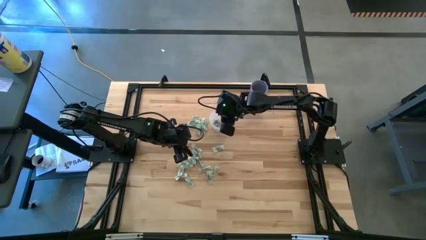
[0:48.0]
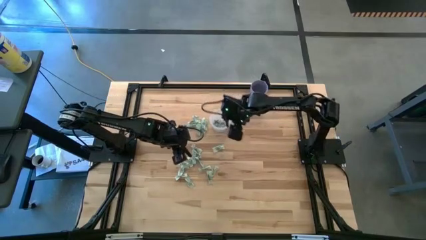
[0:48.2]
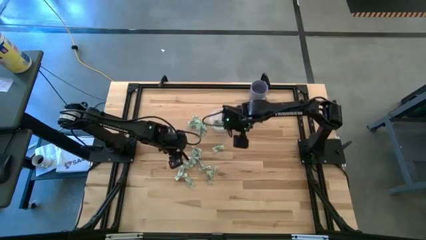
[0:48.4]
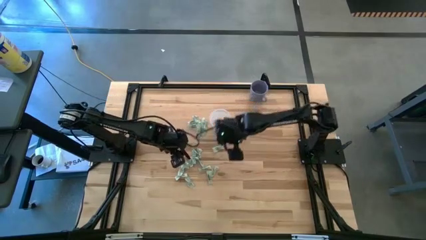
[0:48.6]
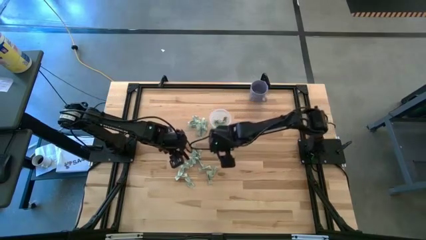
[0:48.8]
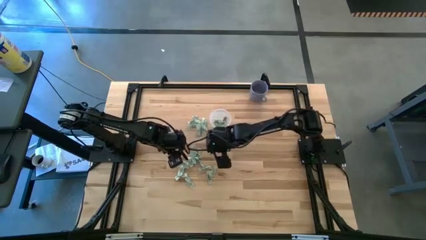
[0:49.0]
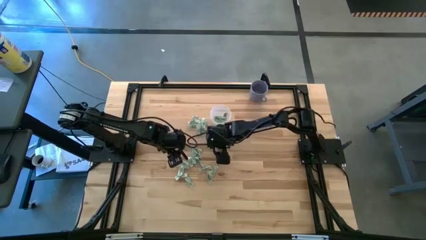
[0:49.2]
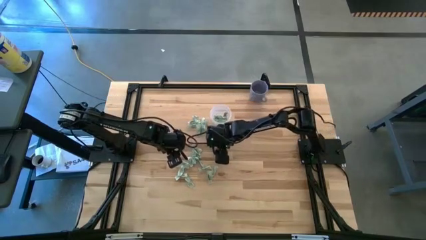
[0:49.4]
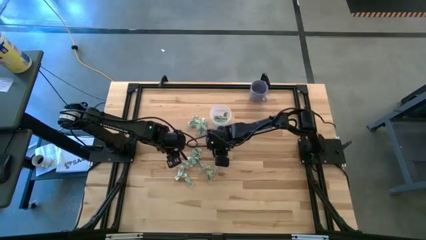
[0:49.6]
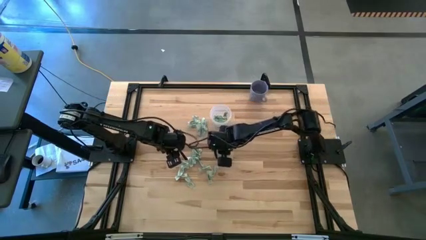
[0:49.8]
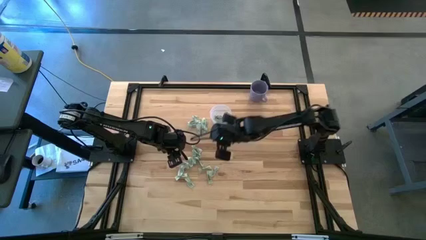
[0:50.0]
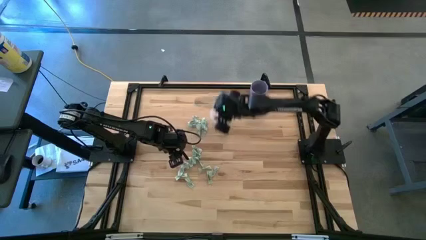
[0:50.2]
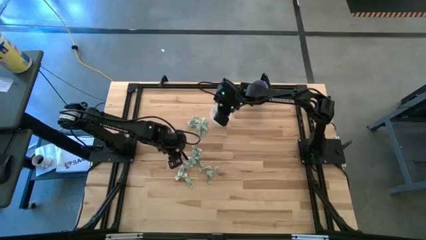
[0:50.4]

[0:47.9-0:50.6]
Task: Pick and place Stevia / Truvia into bins
Put the stevia packet into the transparent container

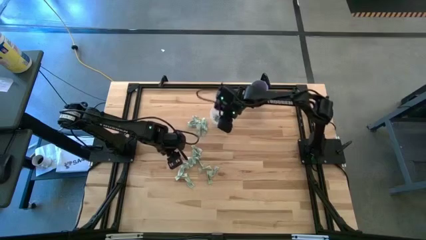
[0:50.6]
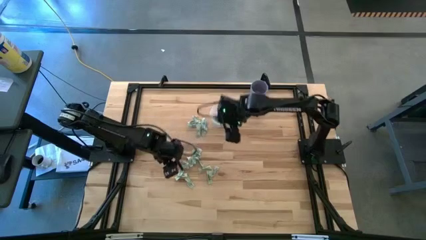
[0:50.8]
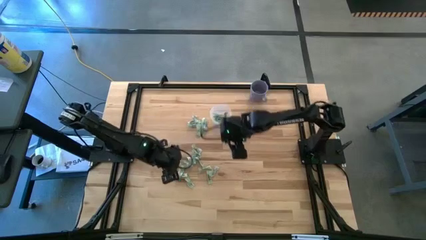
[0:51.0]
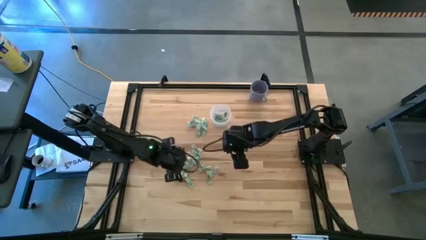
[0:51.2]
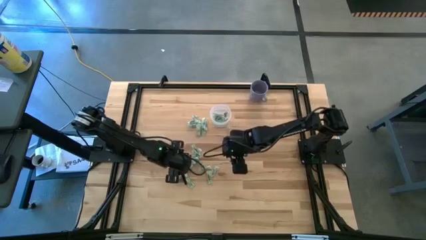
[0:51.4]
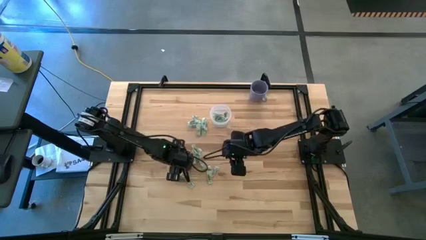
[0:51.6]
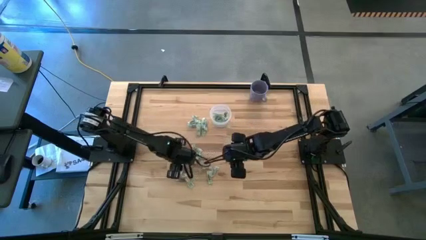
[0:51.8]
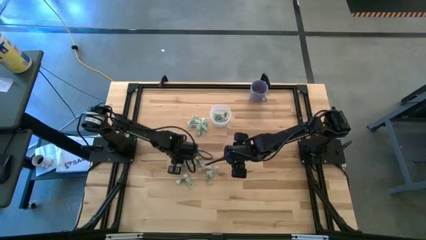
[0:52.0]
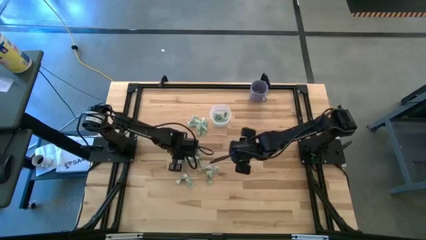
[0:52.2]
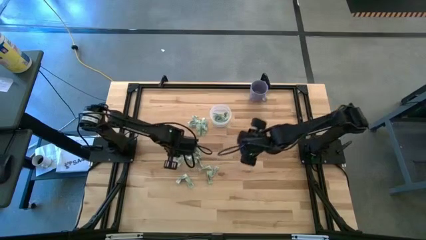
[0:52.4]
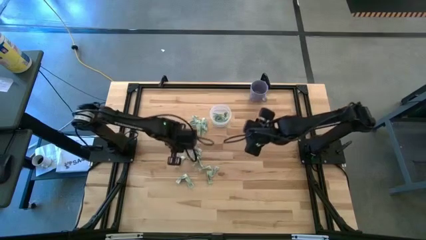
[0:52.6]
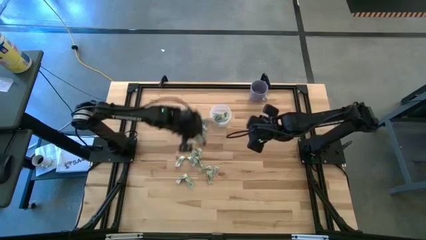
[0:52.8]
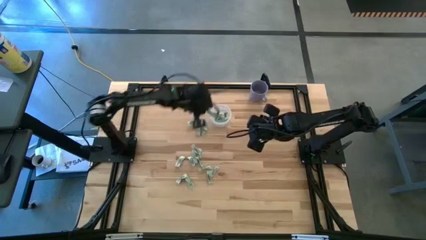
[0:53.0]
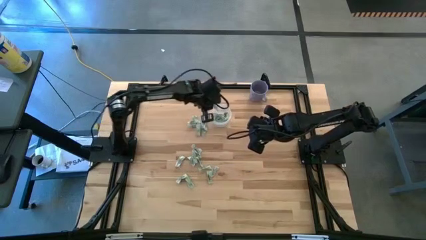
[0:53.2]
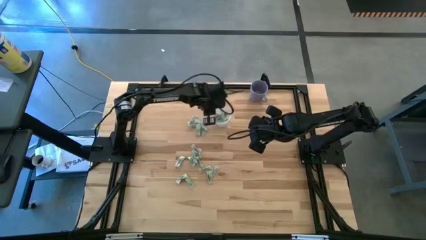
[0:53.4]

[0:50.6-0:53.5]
Put the stevia packet into the transparent container

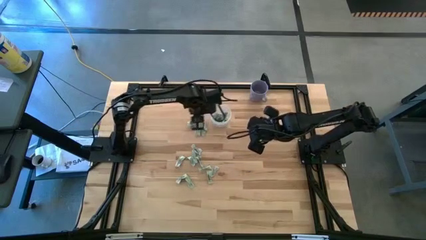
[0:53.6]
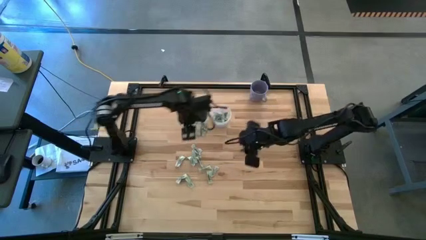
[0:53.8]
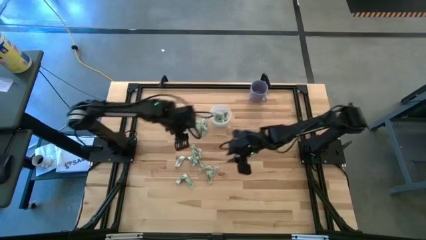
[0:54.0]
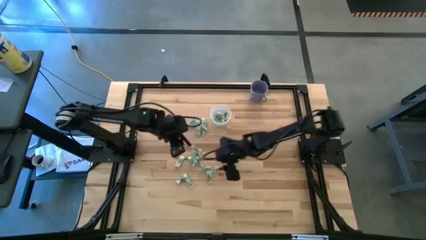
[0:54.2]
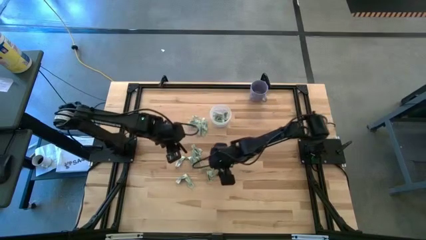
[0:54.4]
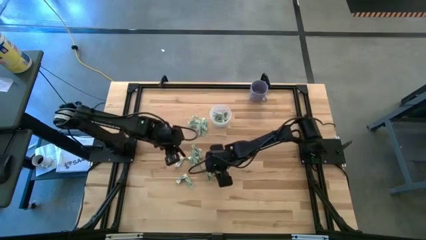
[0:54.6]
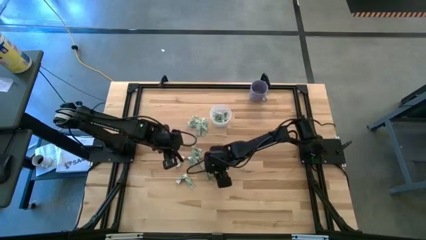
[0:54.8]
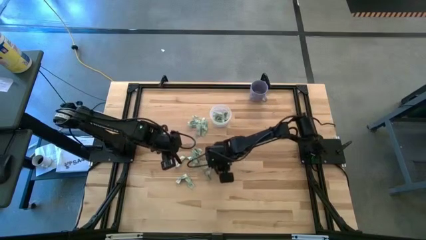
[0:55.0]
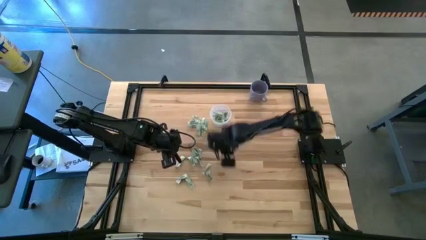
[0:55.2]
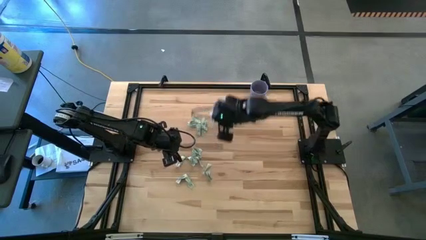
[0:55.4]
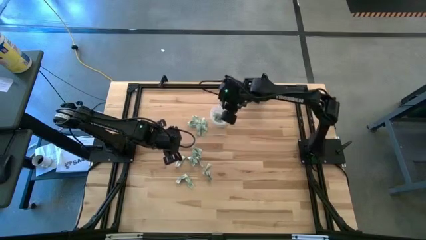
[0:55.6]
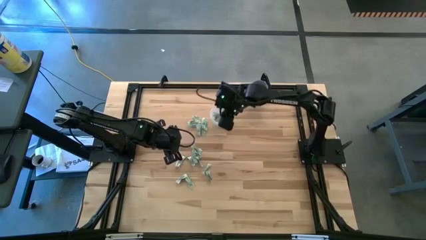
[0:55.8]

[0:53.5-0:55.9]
Put the stevia packet into the transparent container

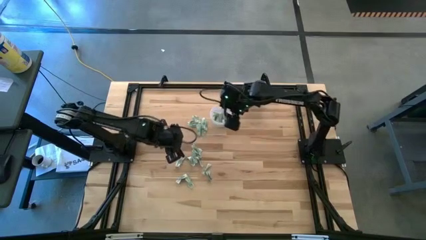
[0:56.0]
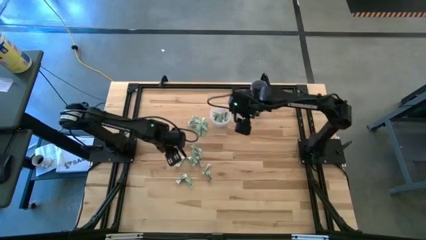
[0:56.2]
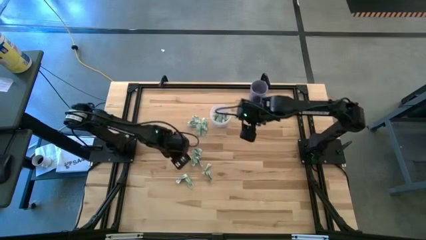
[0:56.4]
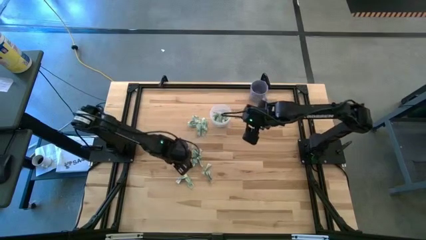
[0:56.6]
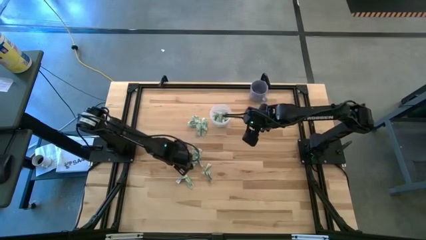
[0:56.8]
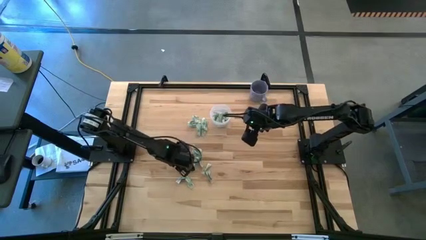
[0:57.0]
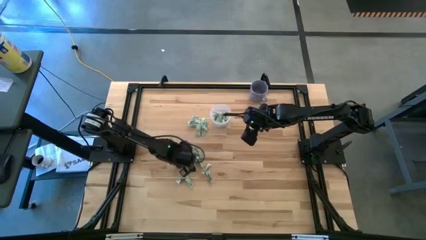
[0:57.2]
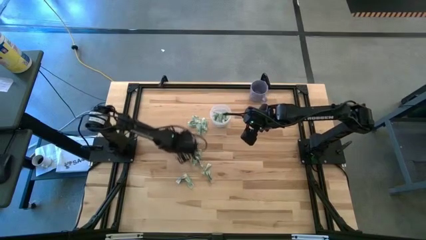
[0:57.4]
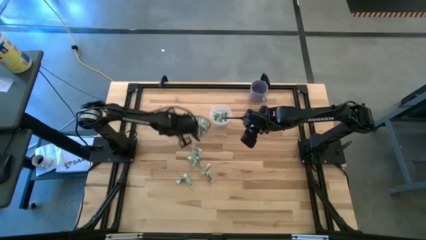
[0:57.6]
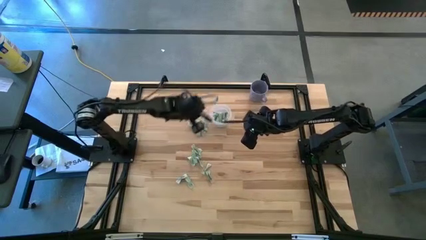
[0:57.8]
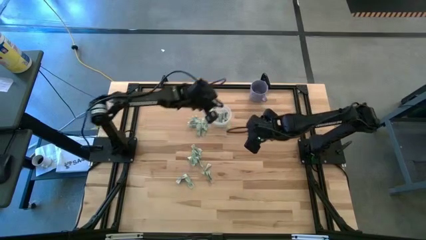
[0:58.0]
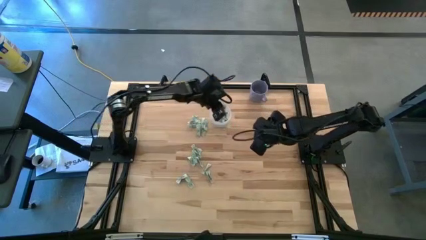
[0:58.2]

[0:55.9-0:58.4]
Put the stevia packet into the transparent container

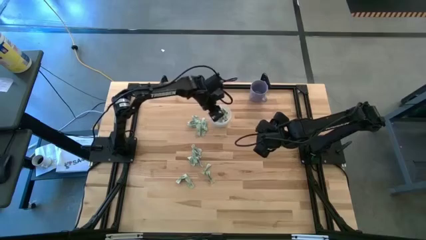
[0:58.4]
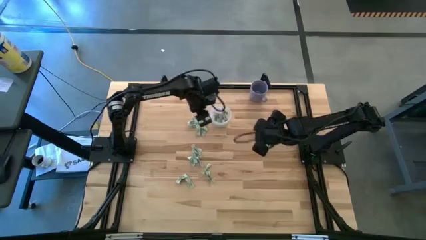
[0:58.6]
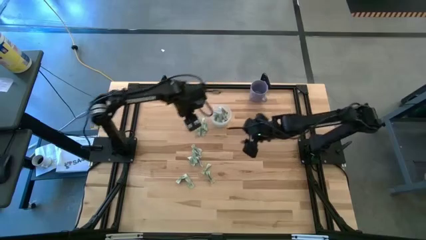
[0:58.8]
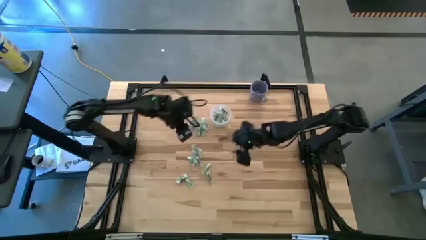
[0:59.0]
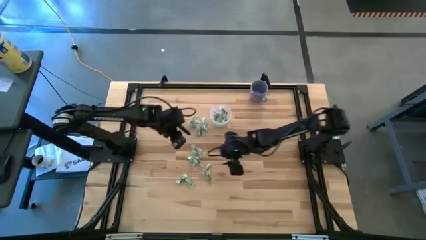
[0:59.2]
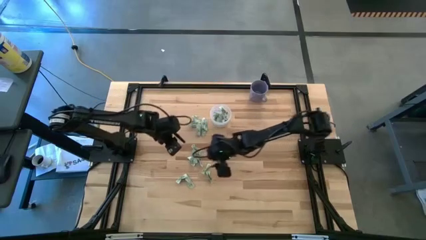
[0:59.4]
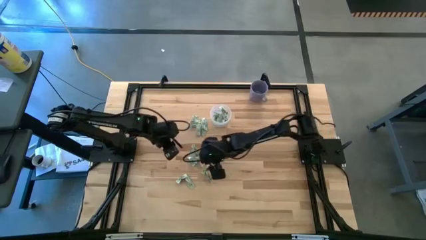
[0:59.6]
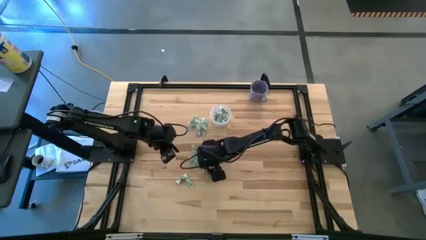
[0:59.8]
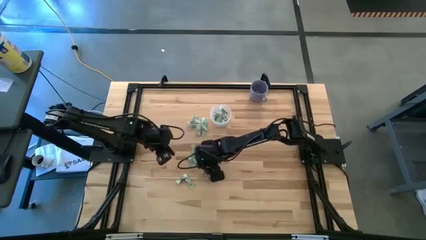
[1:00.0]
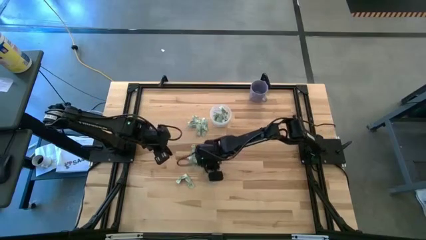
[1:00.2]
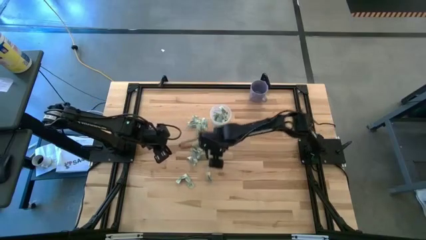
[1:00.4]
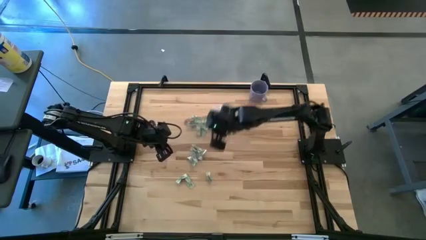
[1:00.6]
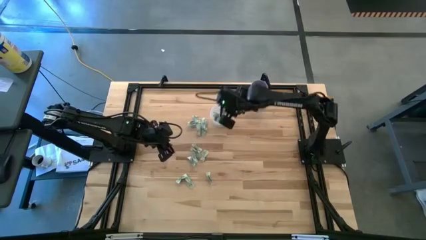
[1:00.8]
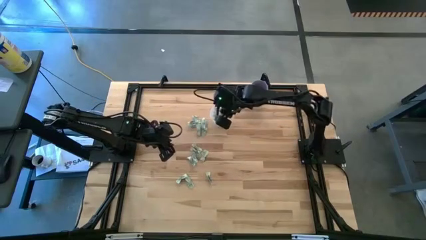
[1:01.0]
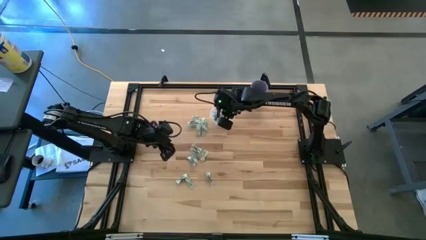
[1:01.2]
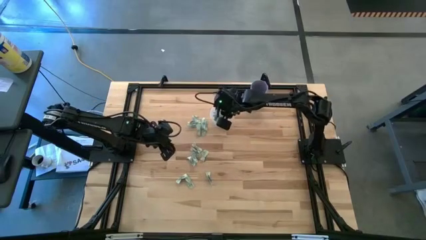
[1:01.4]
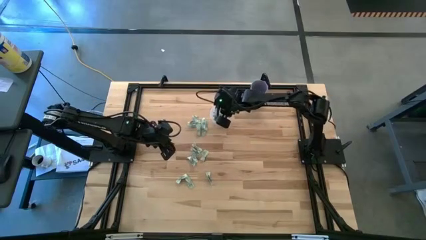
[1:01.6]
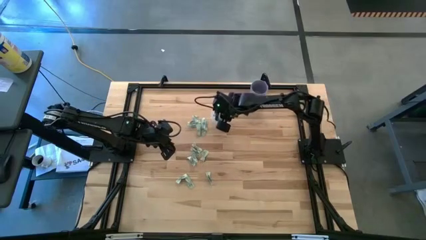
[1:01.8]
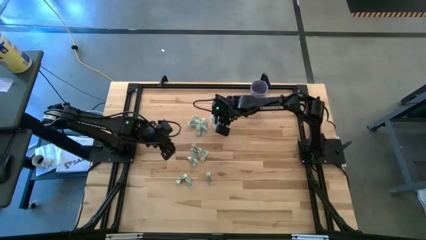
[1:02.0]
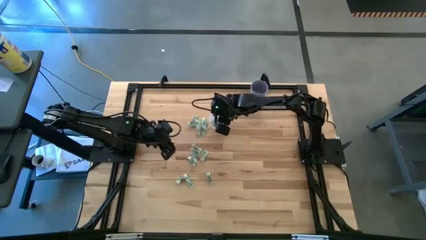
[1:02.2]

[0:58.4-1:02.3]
Put the stevia packet into the transparent container

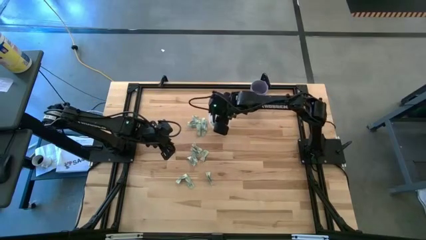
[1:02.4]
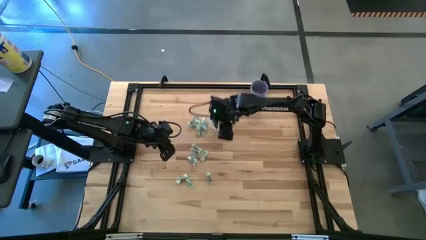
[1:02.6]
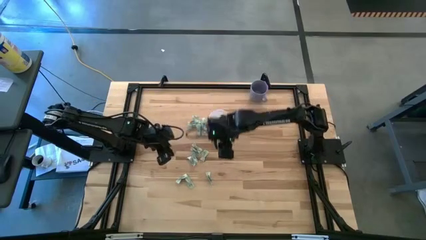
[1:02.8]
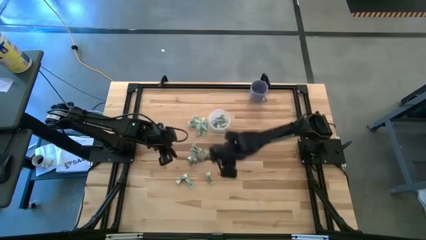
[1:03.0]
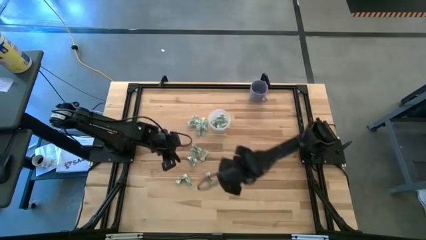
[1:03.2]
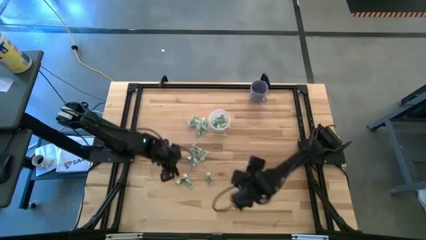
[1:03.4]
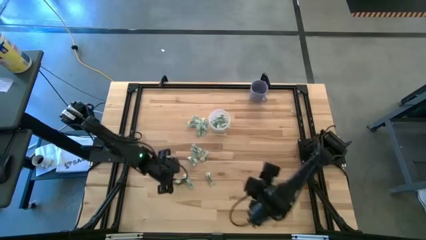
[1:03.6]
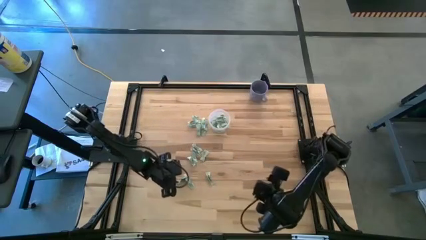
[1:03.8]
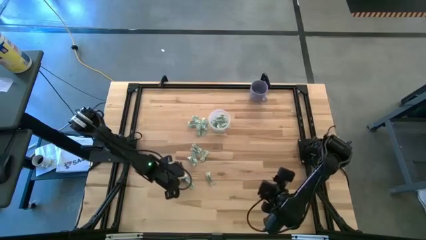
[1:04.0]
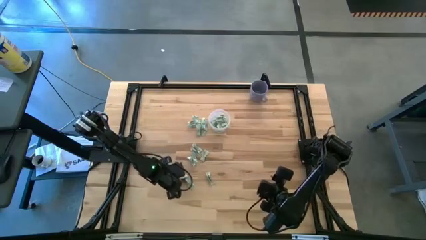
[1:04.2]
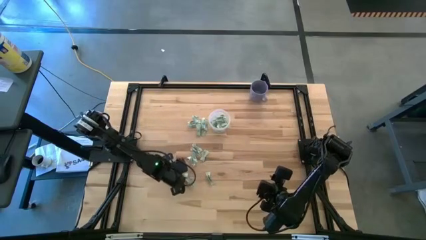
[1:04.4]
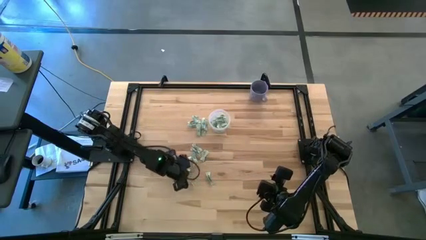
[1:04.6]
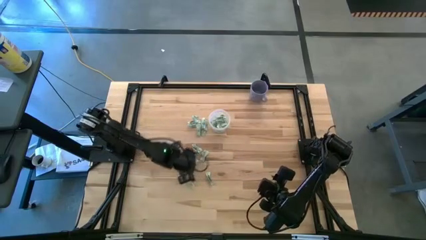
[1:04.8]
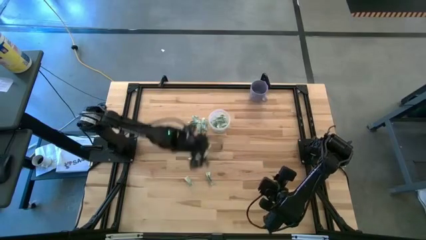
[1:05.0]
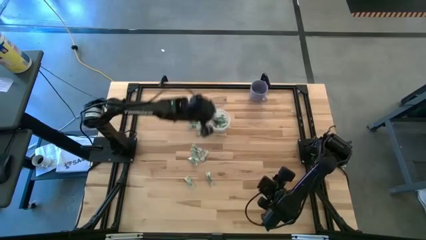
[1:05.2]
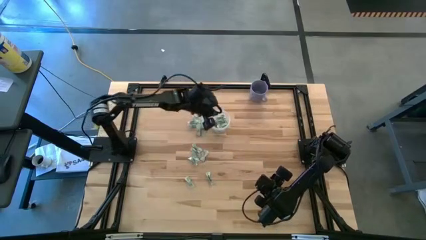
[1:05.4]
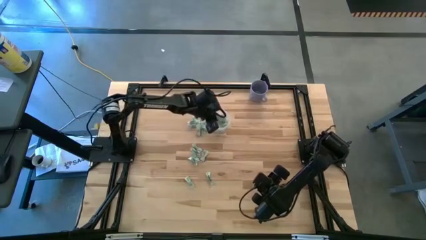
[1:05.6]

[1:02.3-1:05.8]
Put the stevia packet into the transparent container
